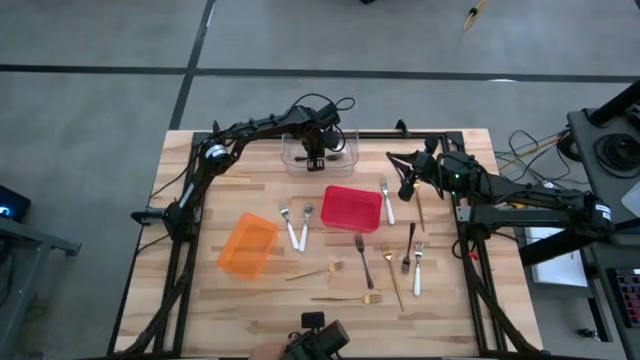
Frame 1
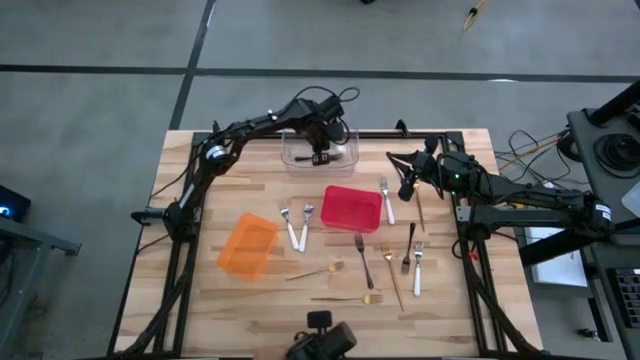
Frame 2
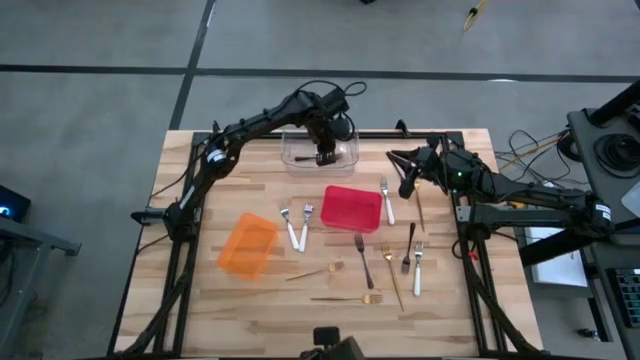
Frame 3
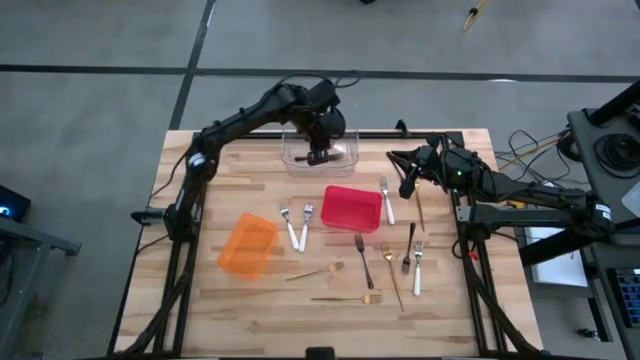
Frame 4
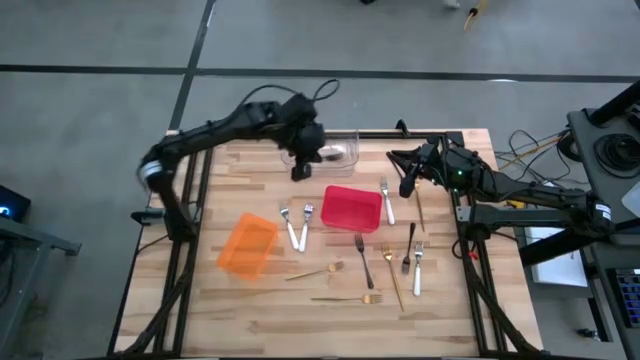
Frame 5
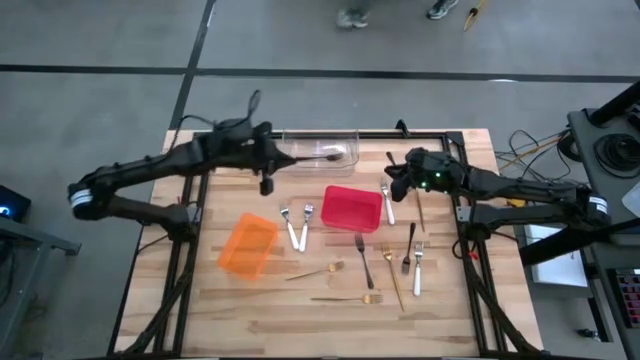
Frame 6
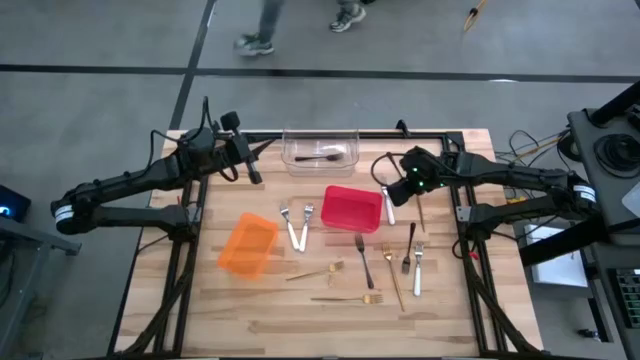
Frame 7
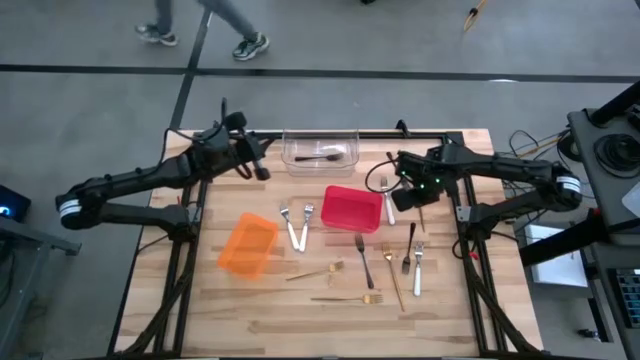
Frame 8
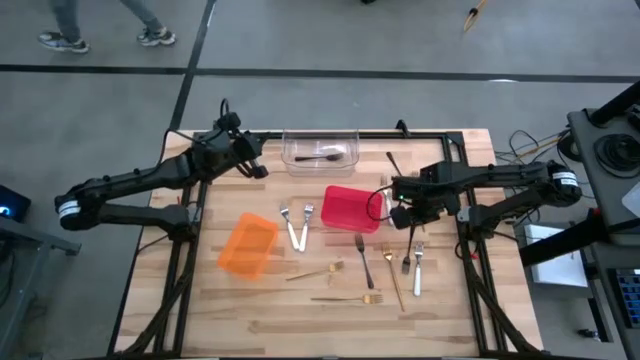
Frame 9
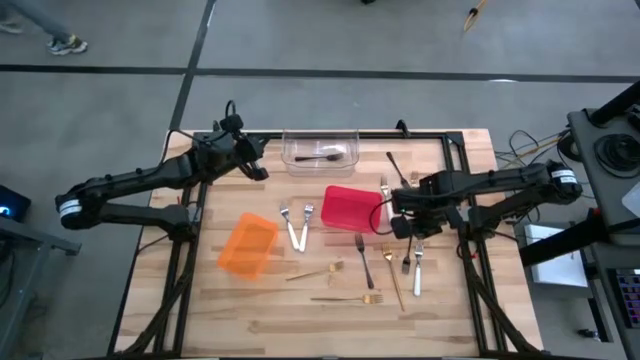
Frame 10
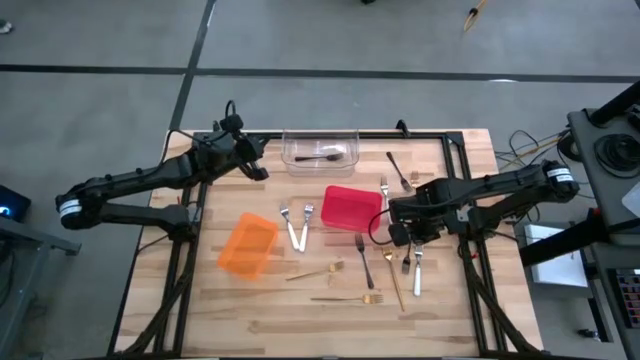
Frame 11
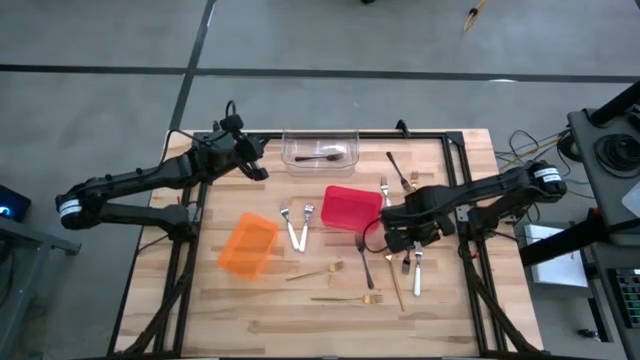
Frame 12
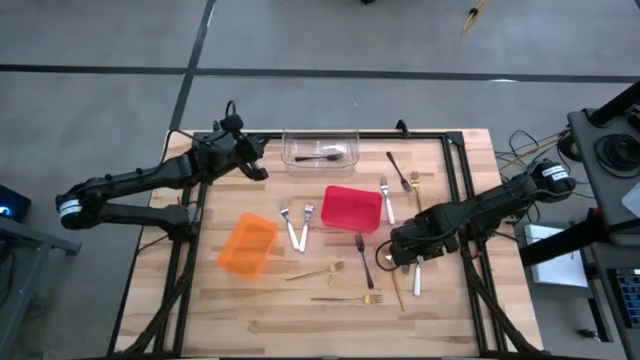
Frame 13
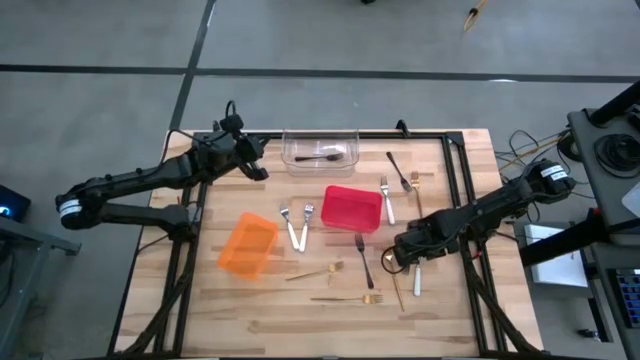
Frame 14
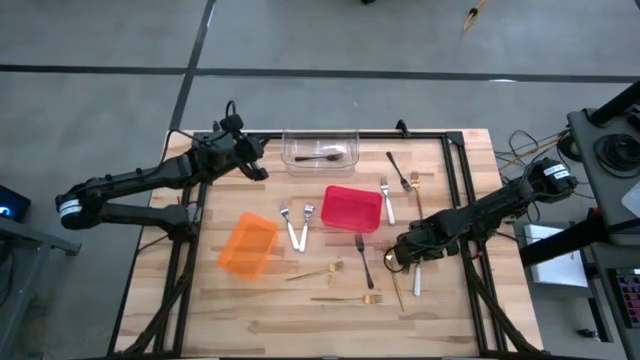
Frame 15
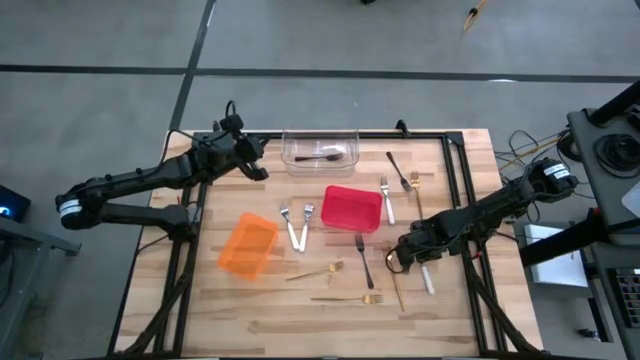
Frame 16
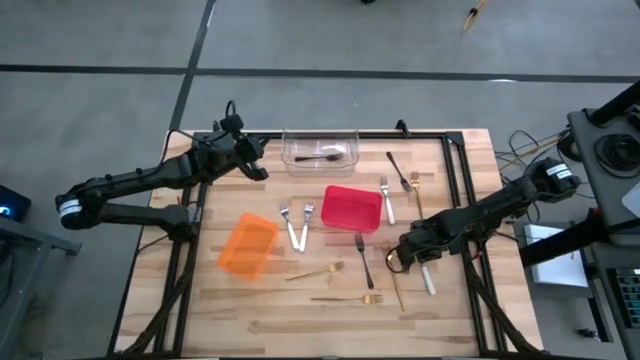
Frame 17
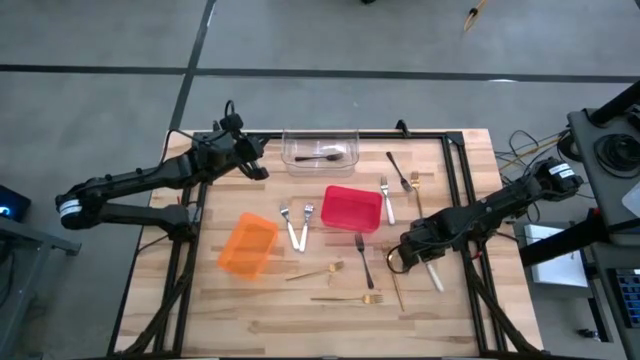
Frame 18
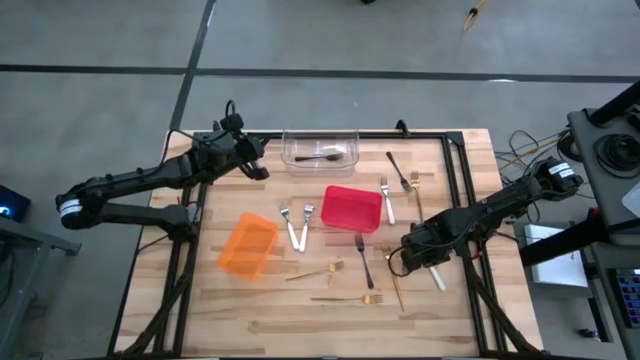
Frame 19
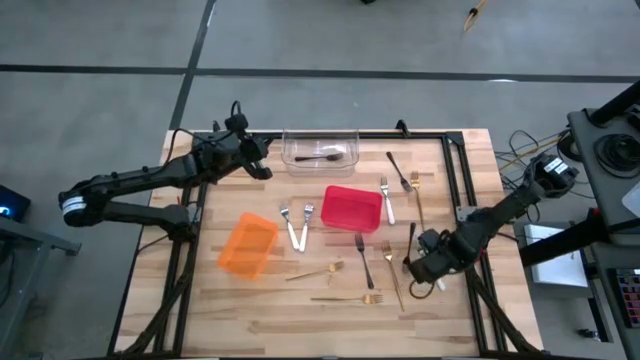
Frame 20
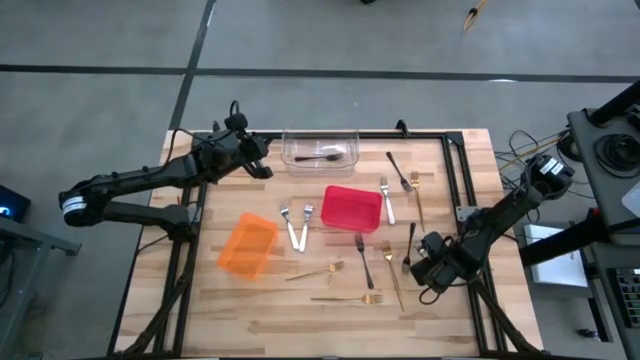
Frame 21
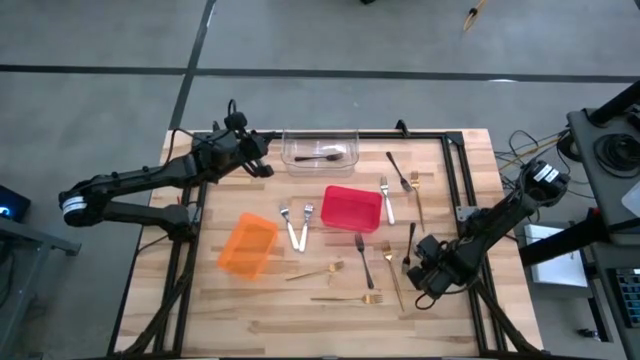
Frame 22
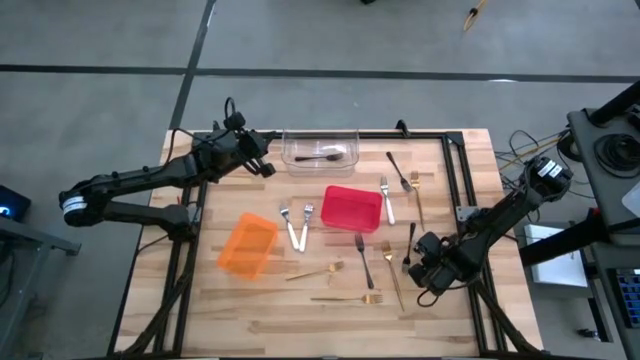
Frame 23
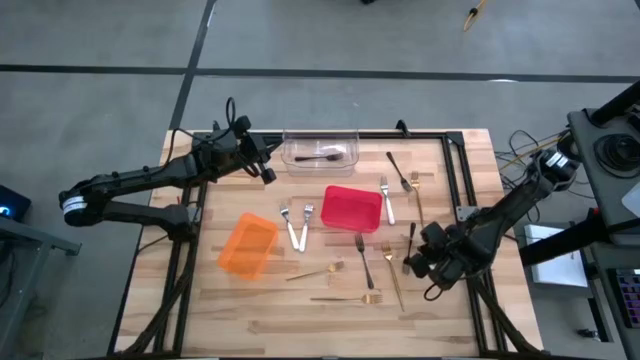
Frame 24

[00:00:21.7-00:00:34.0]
Task: Sort silverware by color (type)
Put the white fork into the red bin

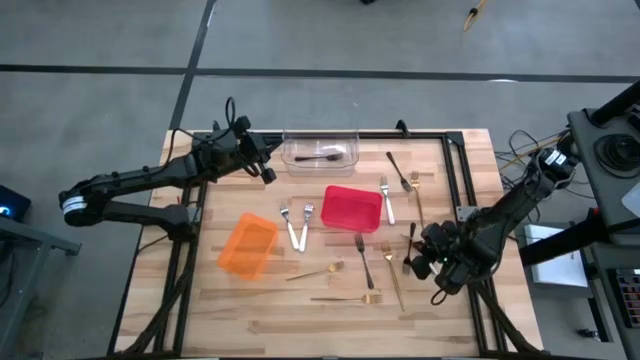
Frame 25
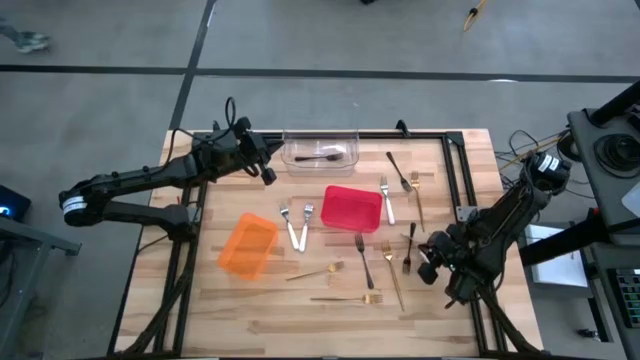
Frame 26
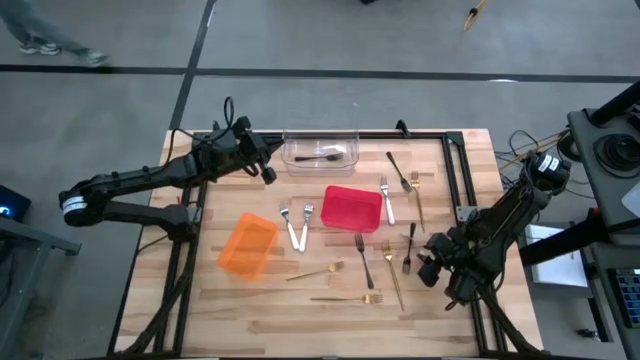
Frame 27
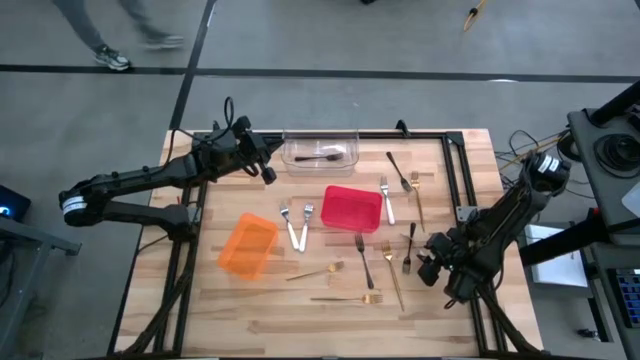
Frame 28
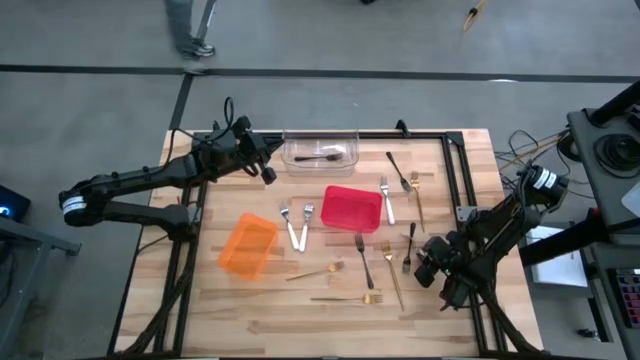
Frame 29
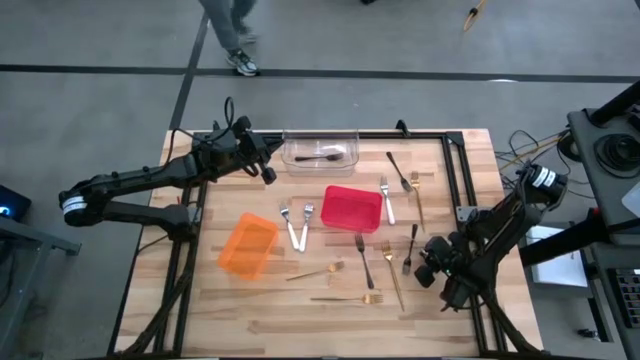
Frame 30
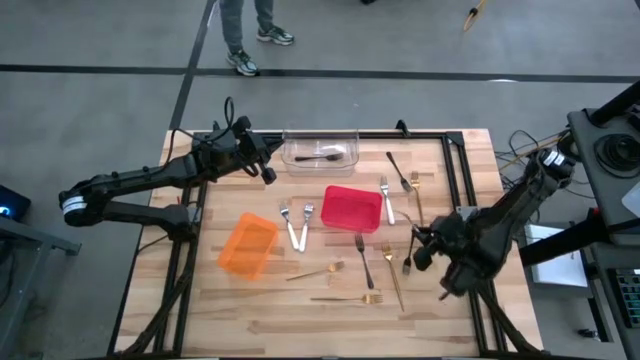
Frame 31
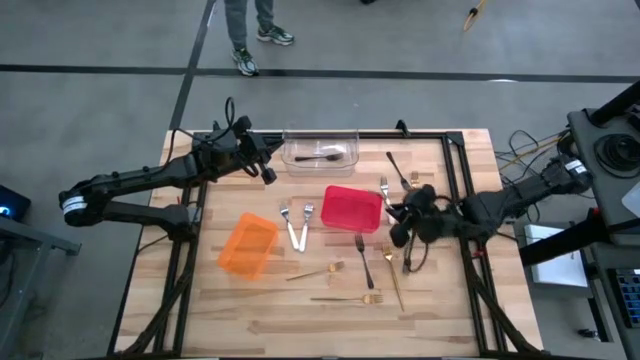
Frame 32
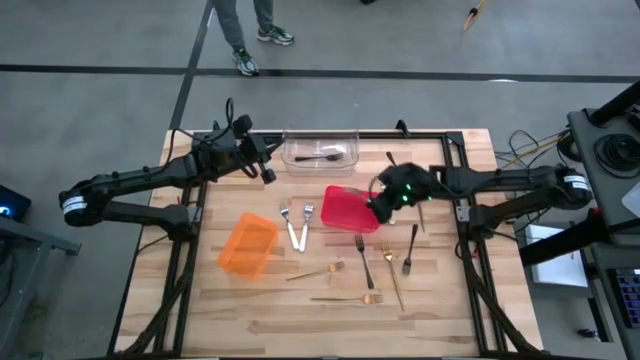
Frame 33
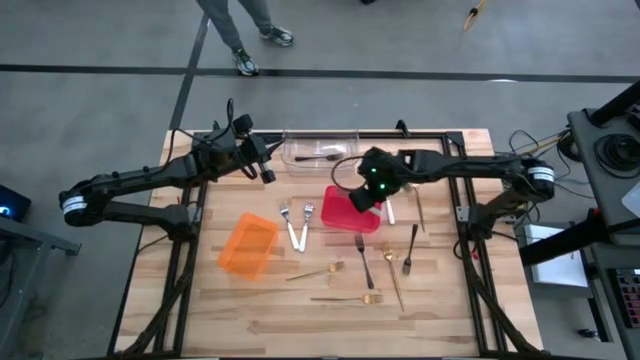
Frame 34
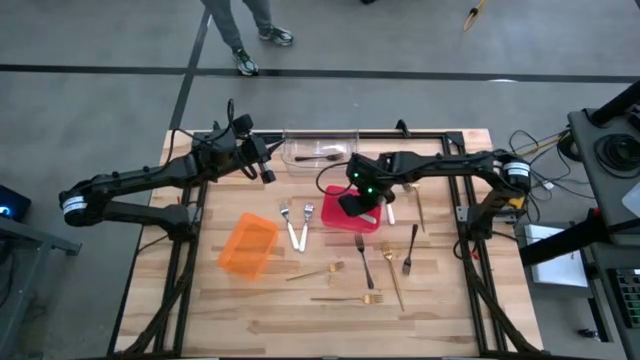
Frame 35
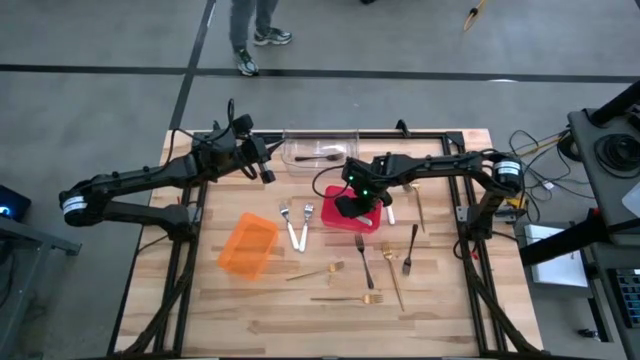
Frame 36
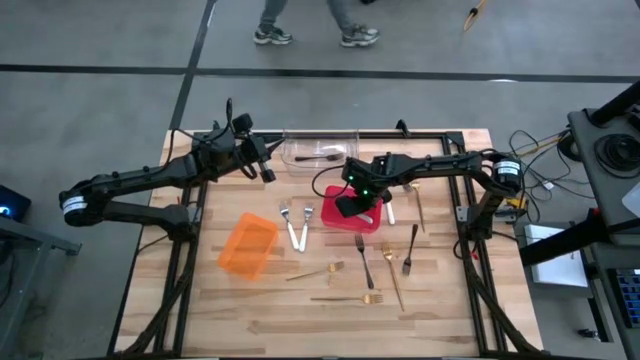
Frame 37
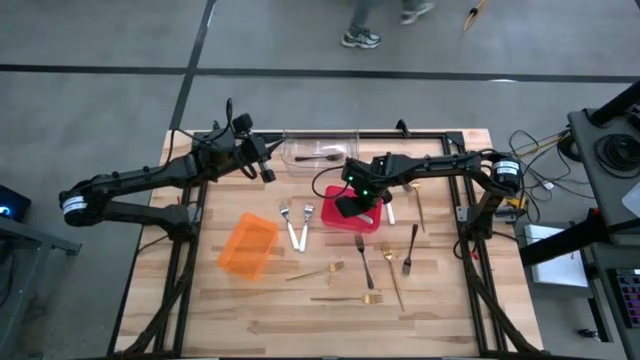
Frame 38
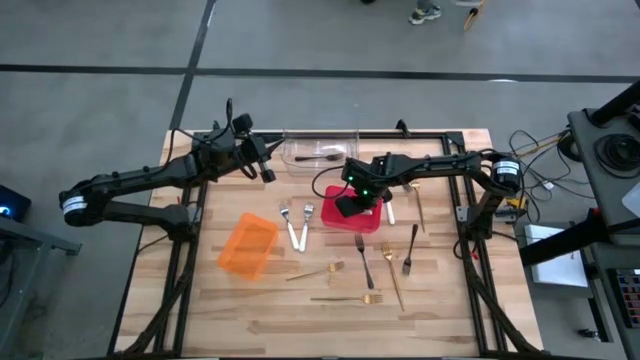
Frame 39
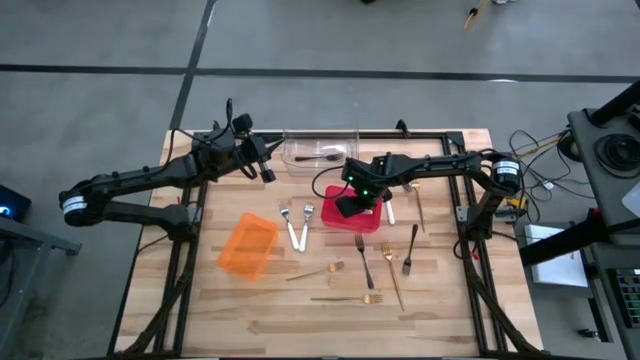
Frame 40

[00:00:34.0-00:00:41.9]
Put the white fork into the red bin
